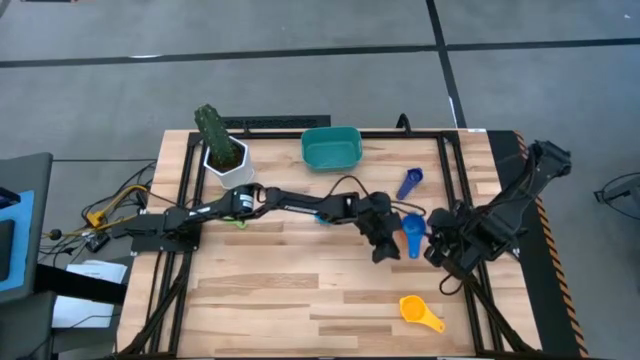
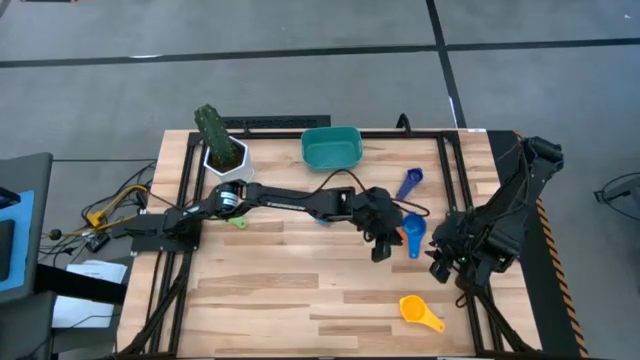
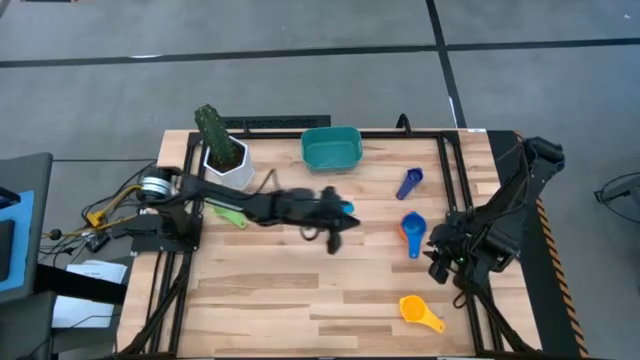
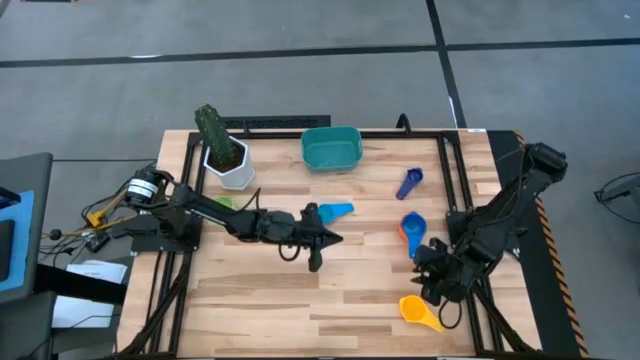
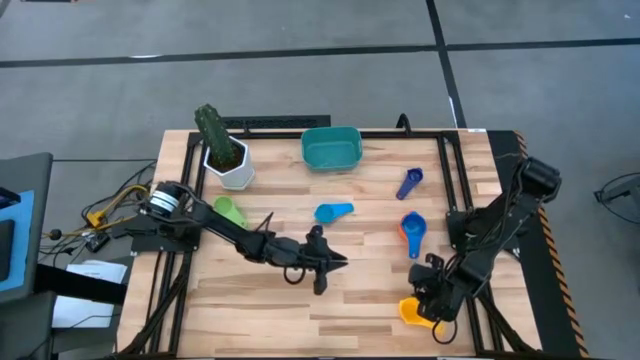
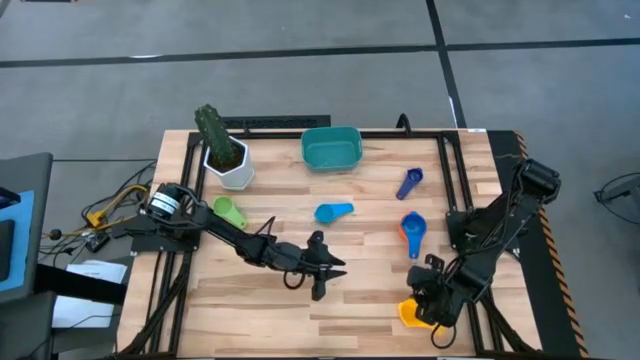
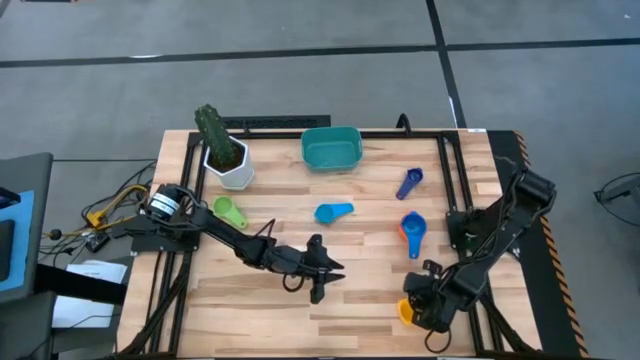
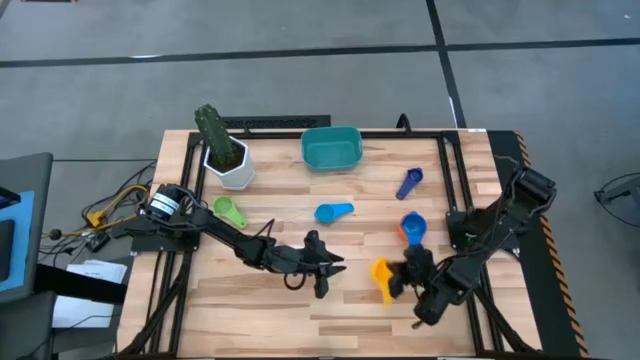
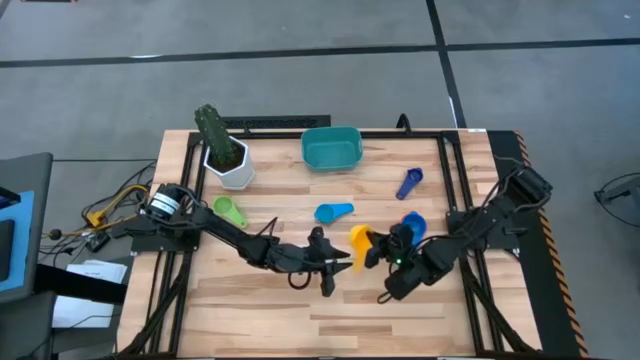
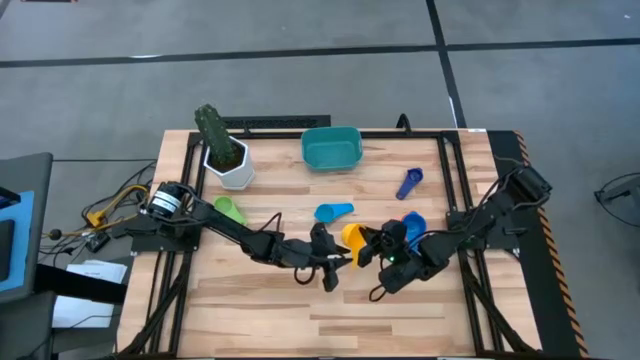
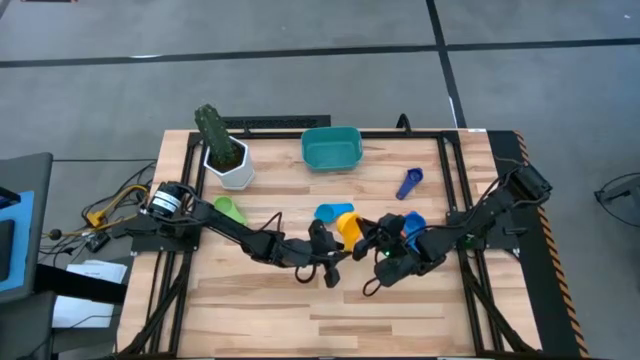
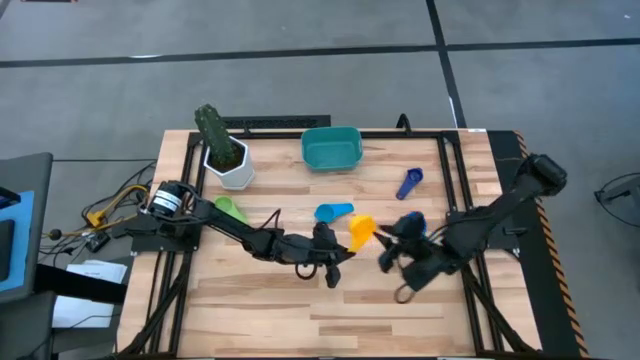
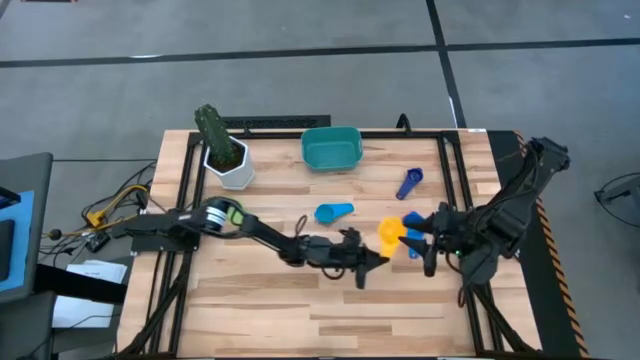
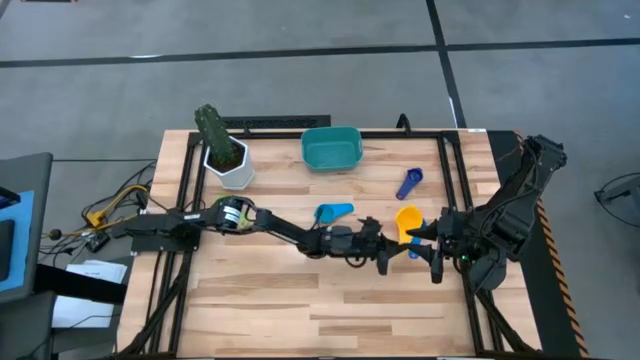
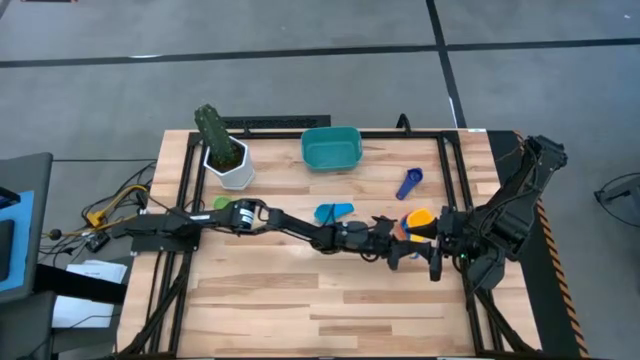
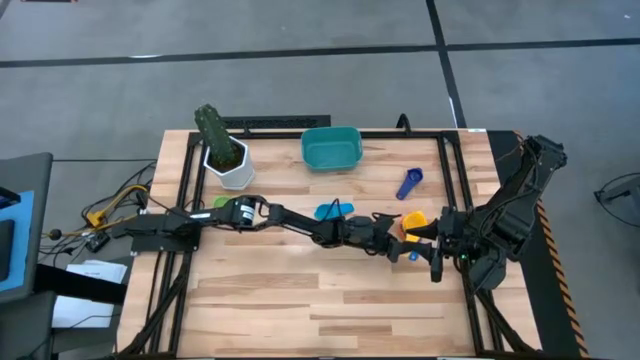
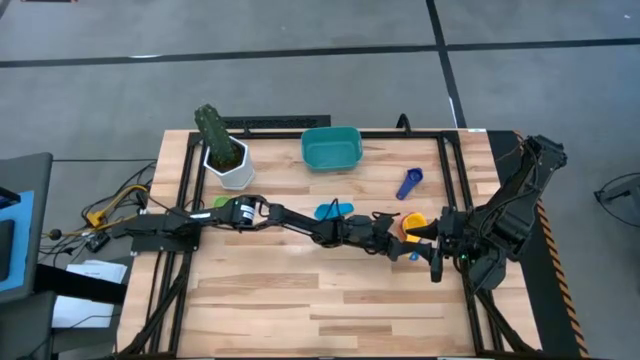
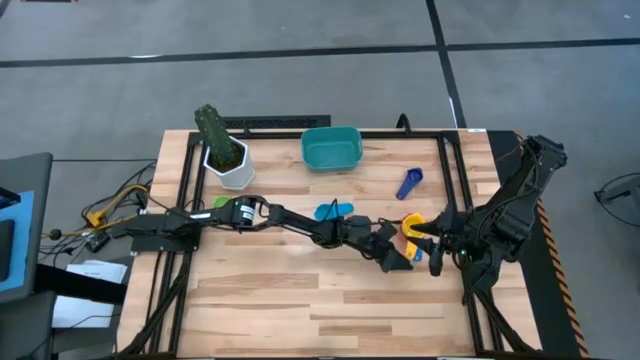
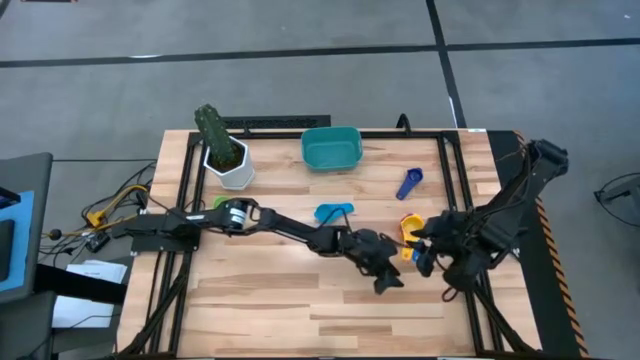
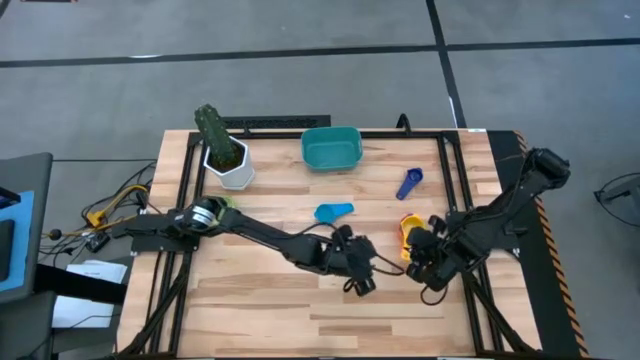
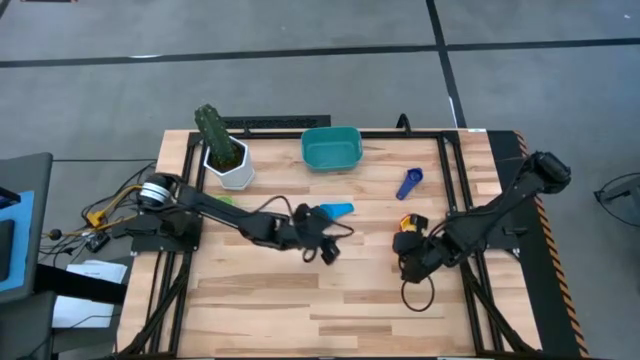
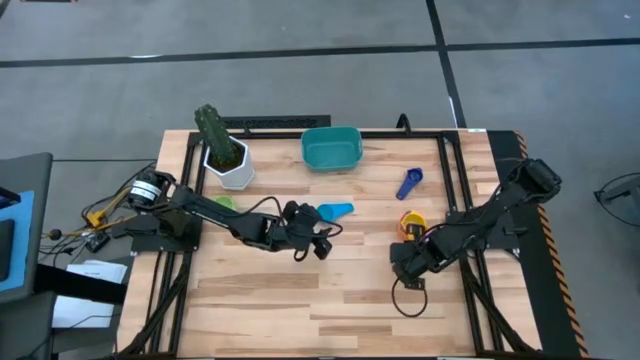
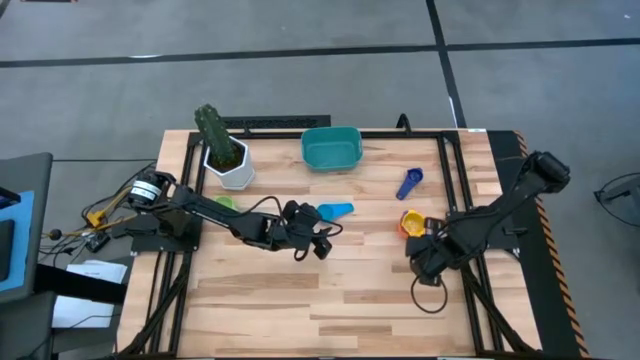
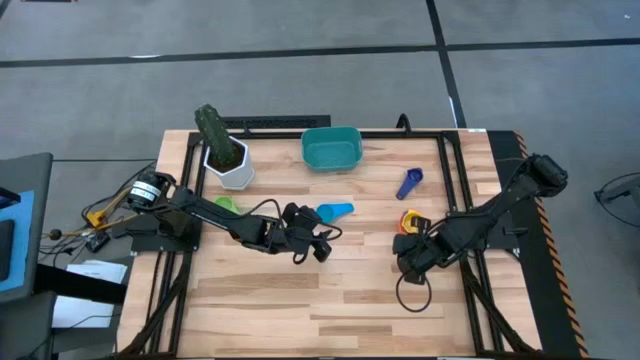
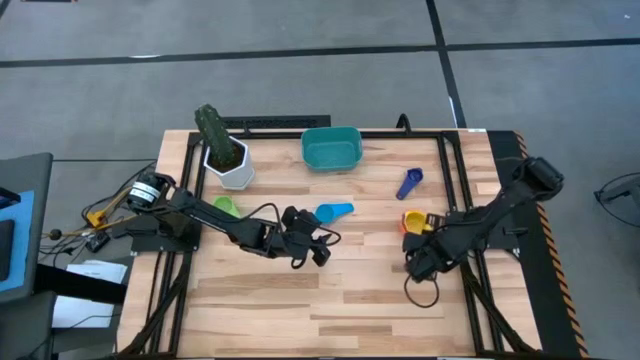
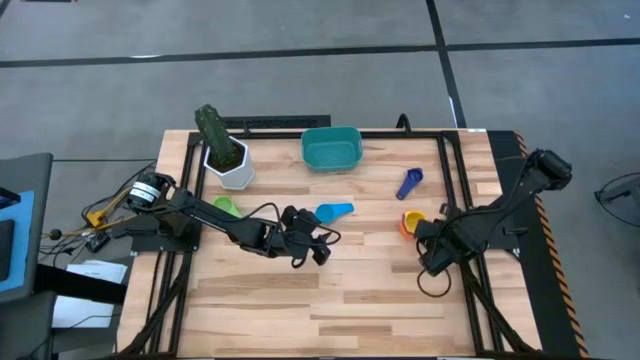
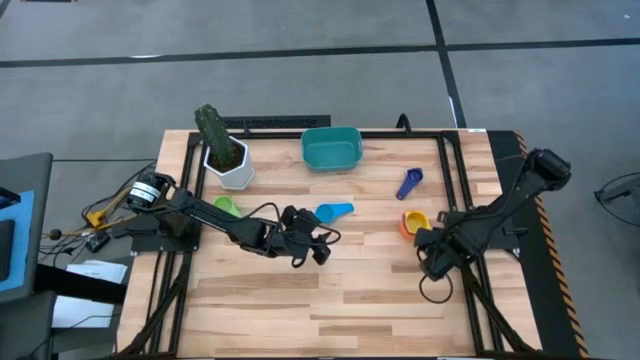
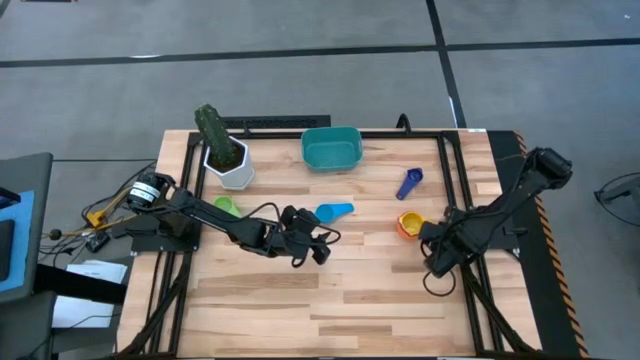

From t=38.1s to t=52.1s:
Task: Nest measuring cups in basket
Stack the yellow measuring cup into the large blue measuring cup

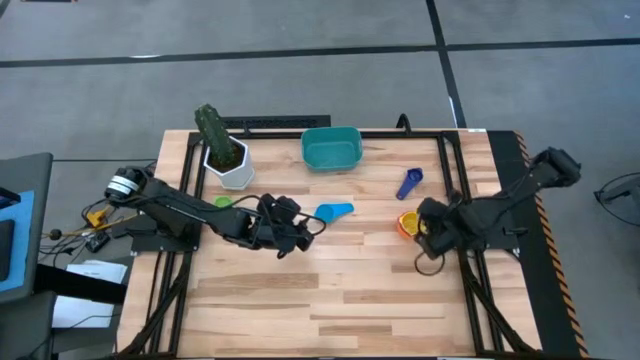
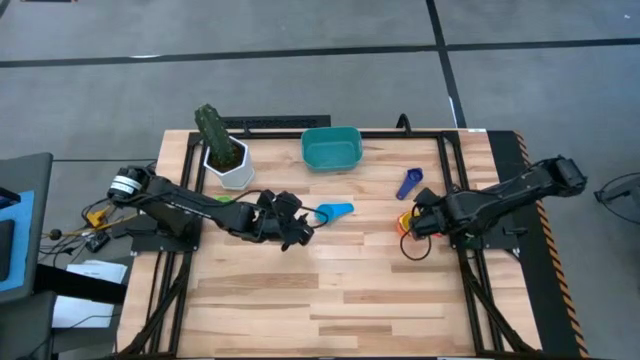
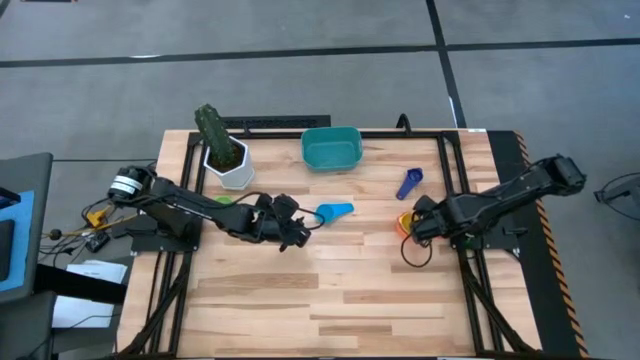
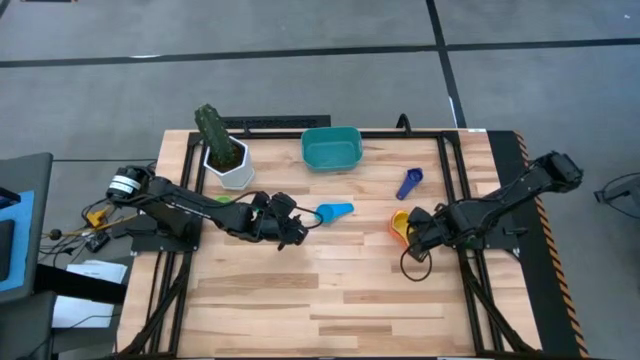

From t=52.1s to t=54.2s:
Adjust the stacked measuring cups

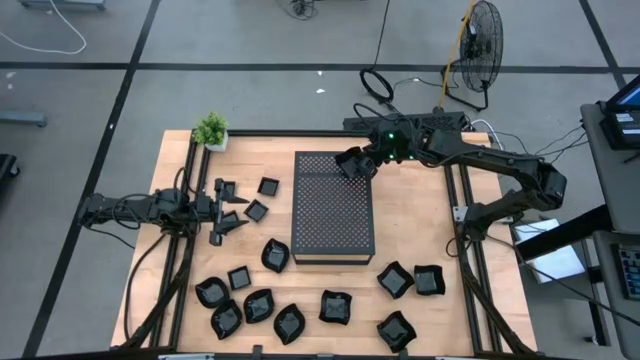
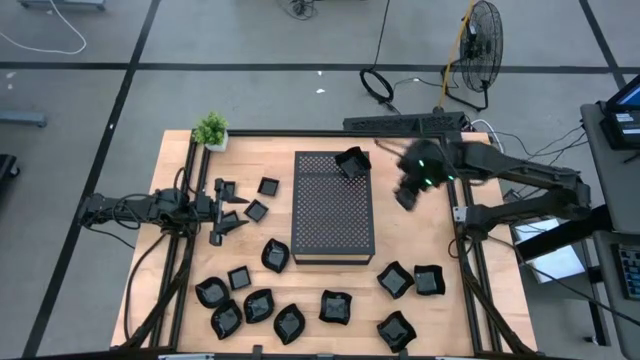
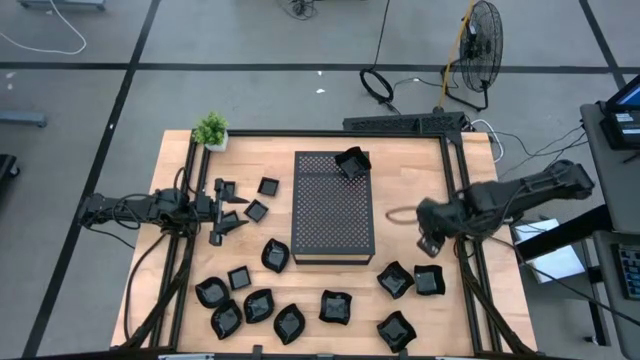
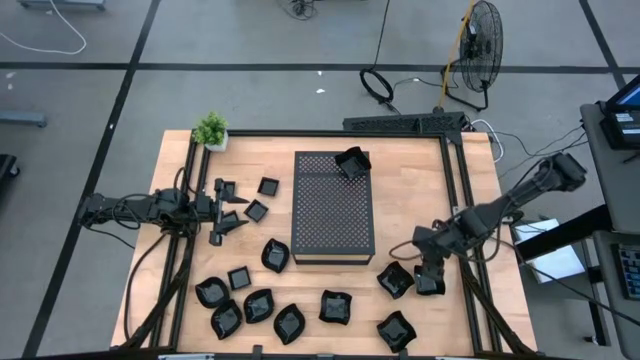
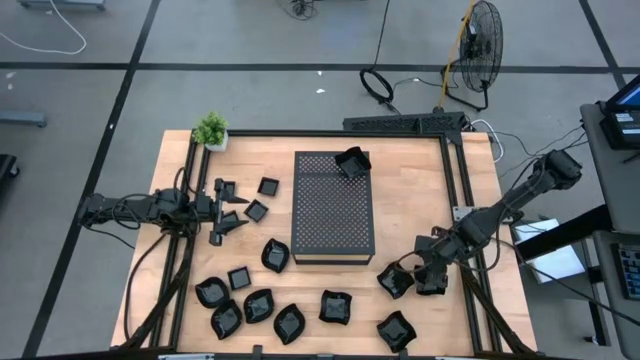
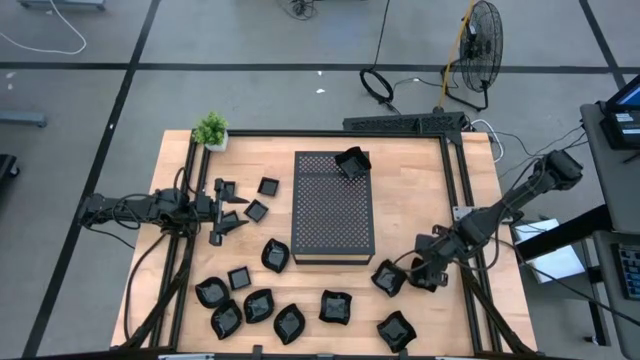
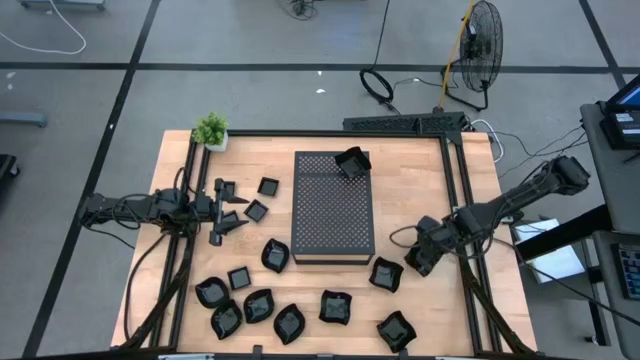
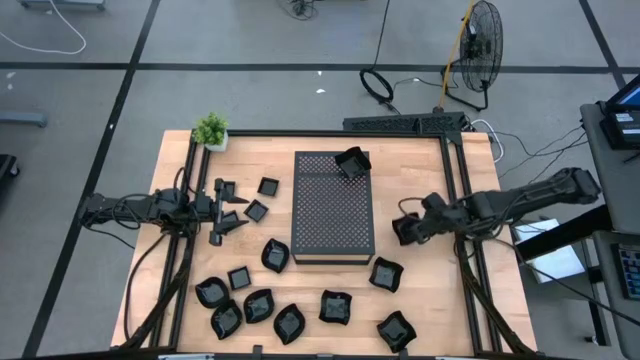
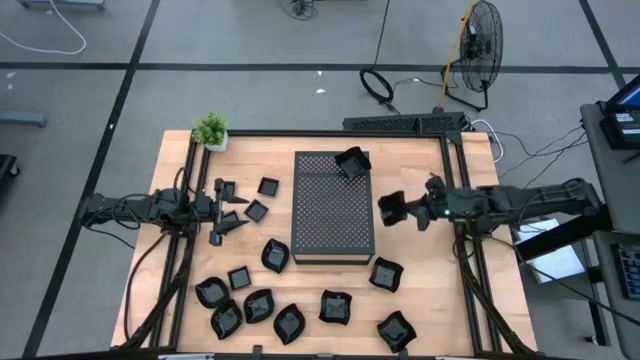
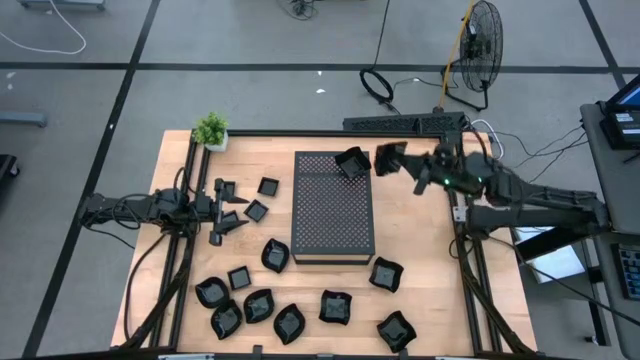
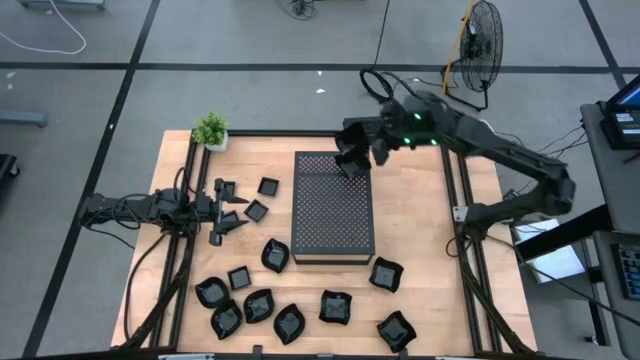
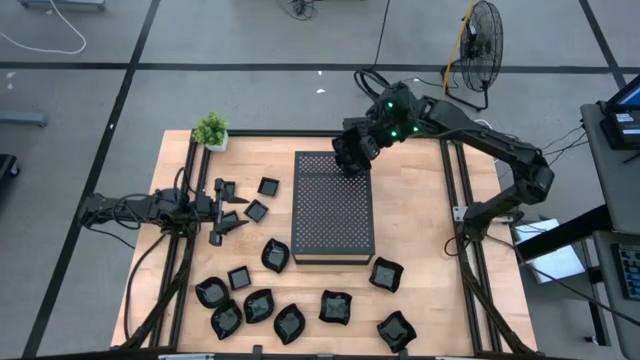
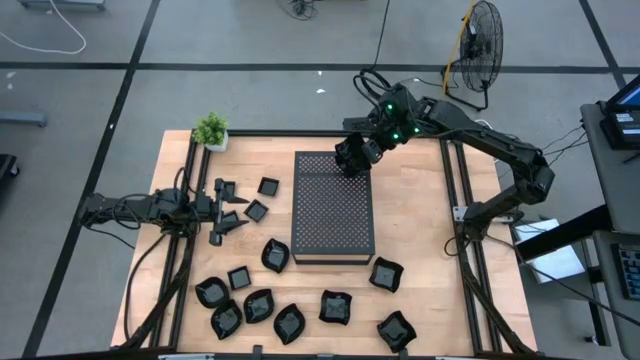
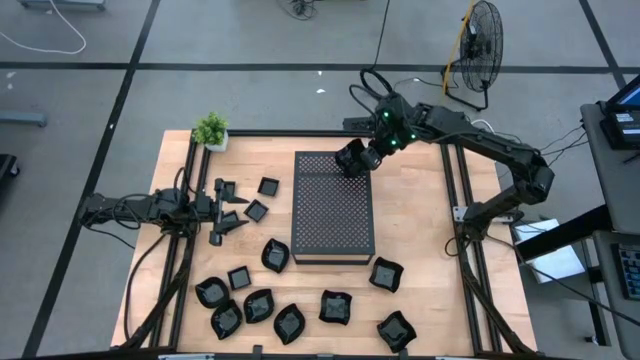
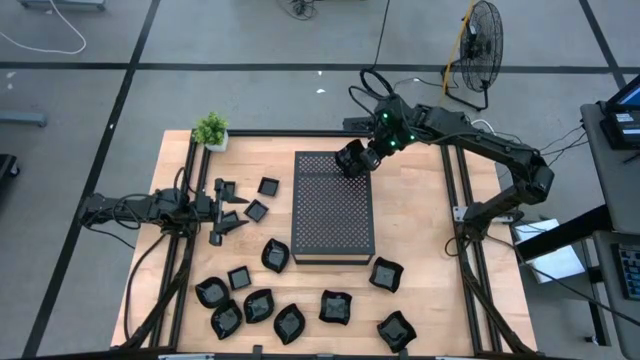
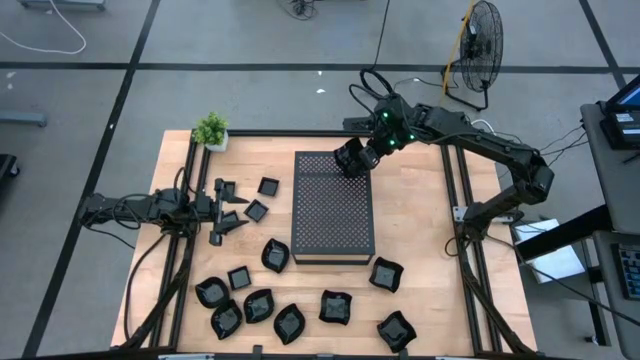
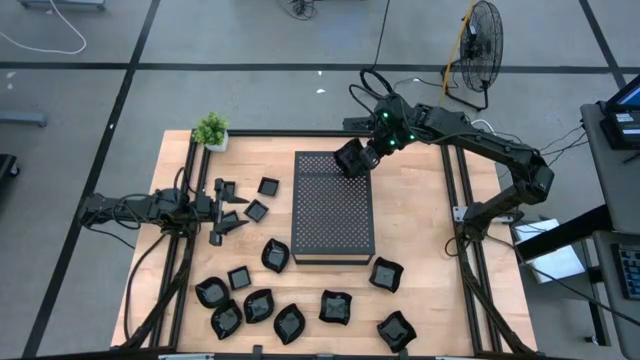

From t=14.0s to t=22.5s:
Task: Pick & Place Mini shaped plates
Stack the black distorted square plate on top of the black distorted square plate on the shelf
